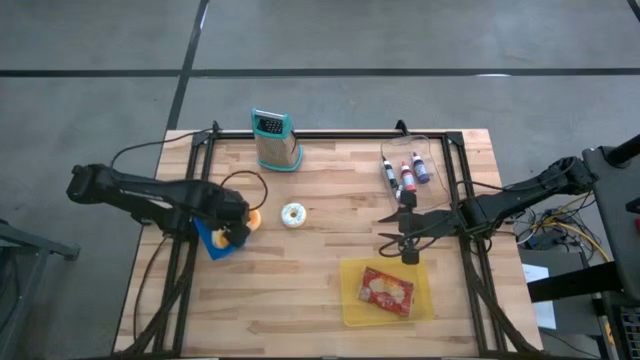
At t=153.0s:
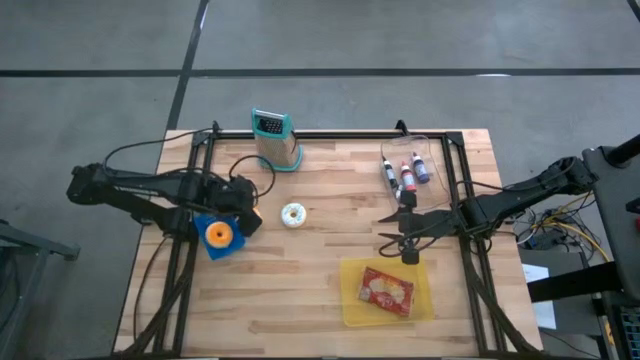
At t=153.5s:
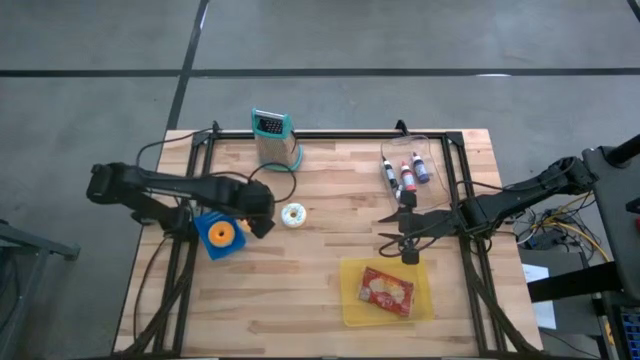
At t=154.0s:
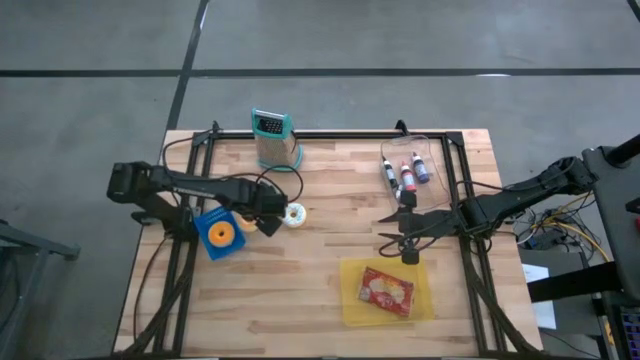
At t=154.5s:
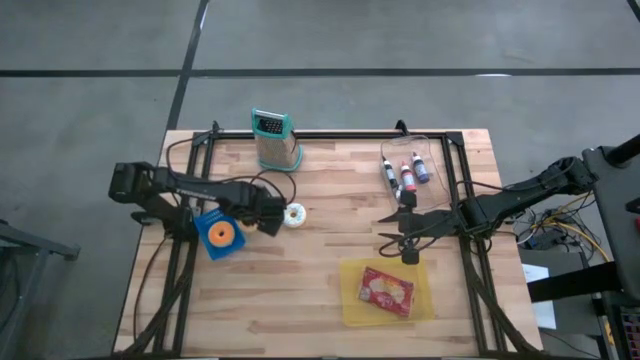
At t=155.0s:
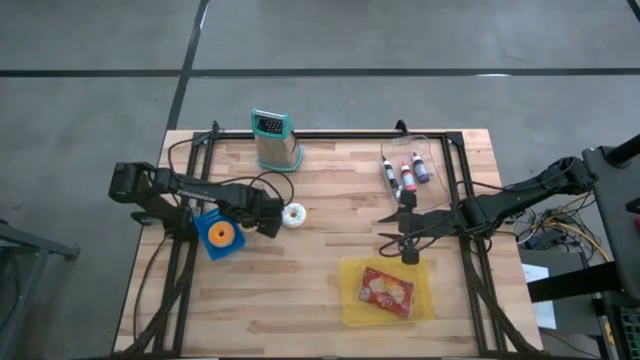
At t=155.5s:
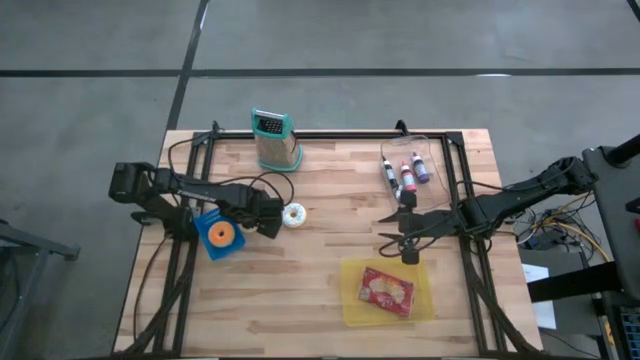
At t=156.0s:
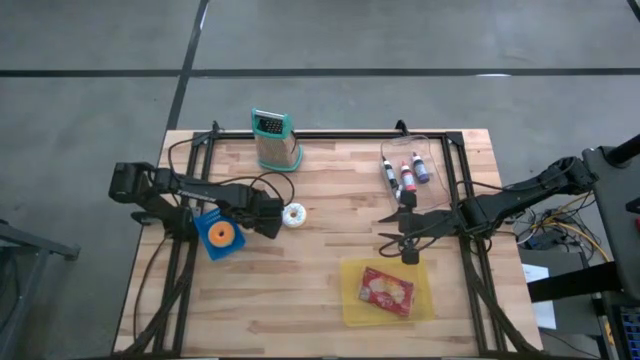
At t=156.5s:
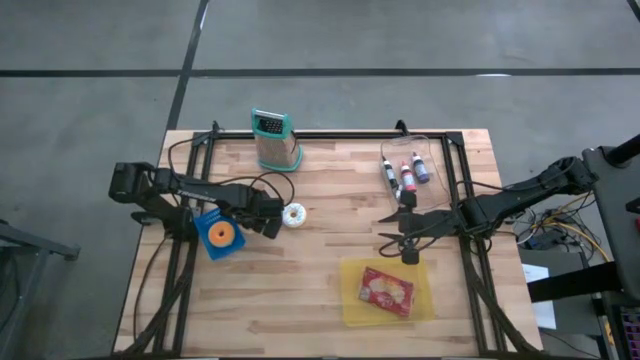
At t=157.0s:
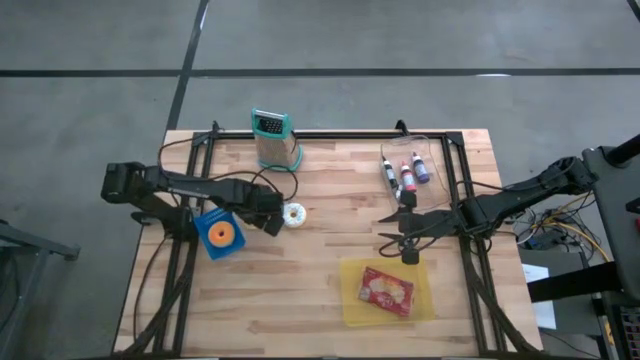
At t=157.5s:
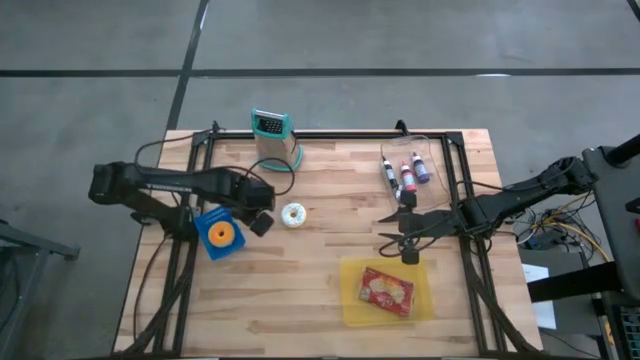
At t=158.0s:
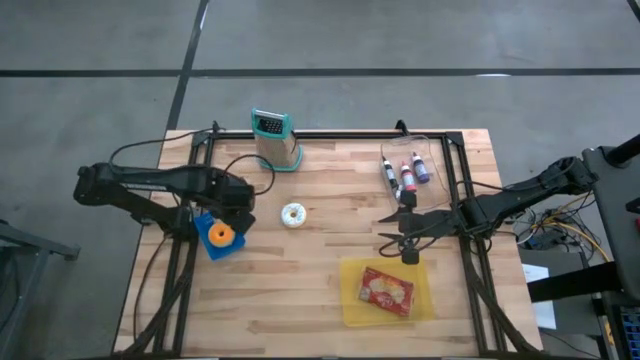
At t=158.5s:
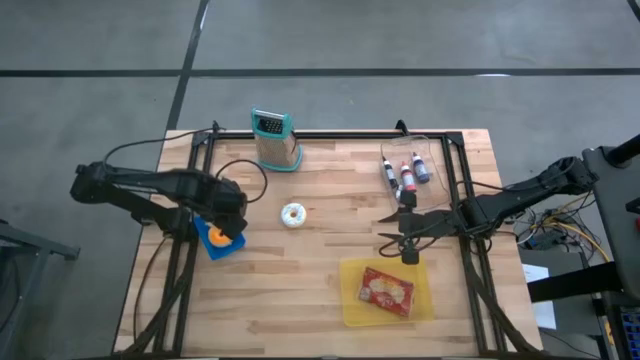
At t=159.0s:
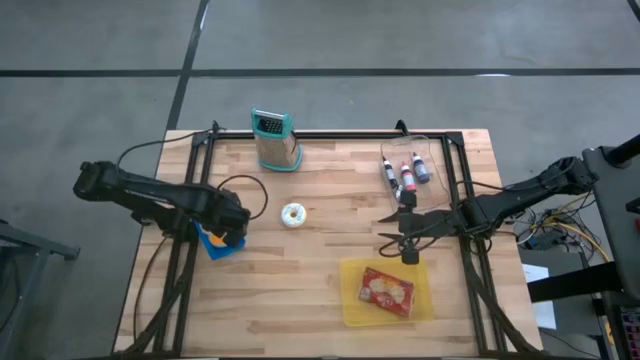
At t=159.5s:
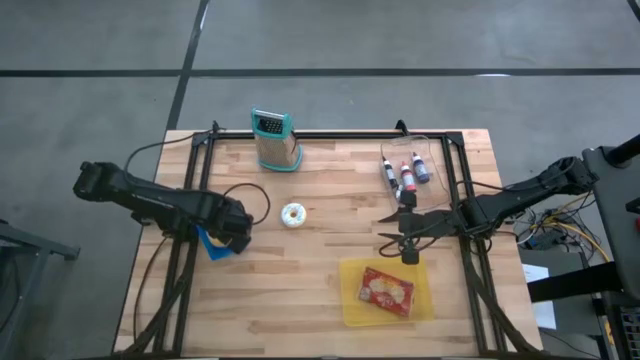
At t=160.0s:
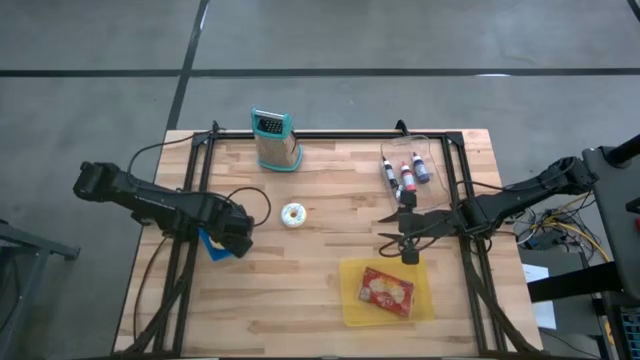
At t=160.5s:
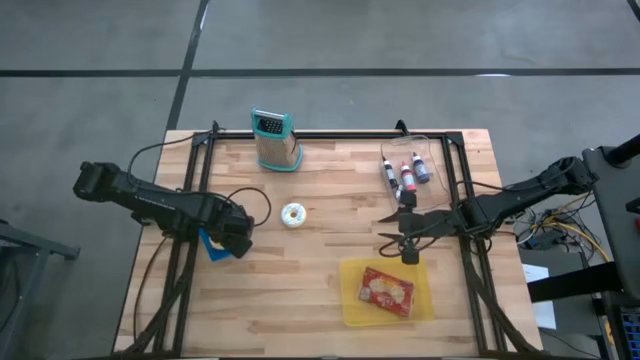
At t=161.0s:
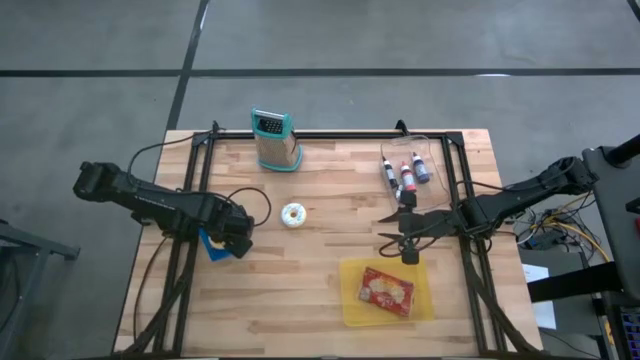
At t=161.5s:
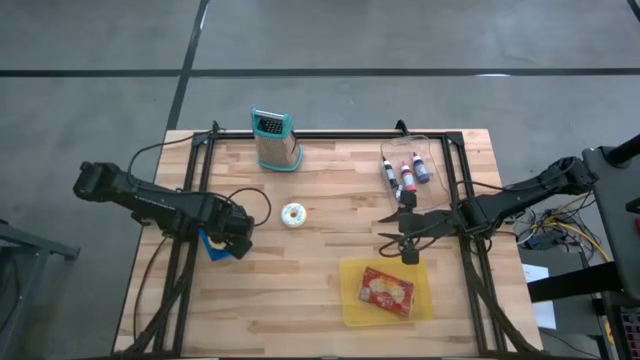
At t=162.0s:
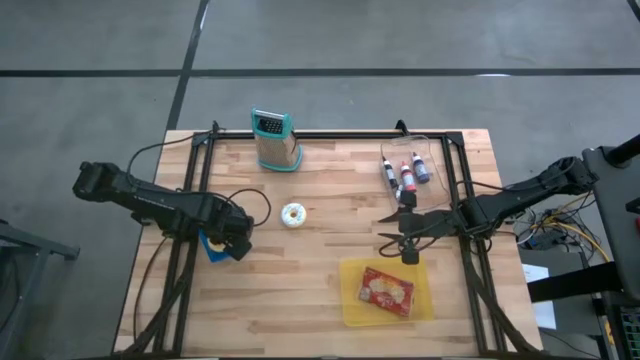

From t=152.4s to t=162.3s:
Task: Pick & Place Food Item
Put the orange donut into the blue bin

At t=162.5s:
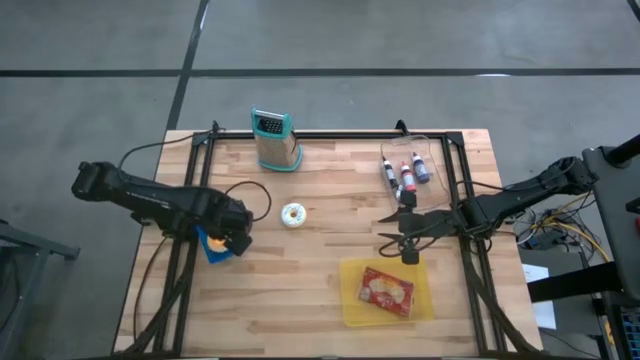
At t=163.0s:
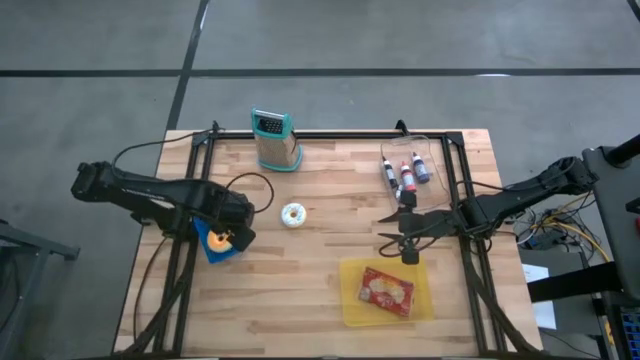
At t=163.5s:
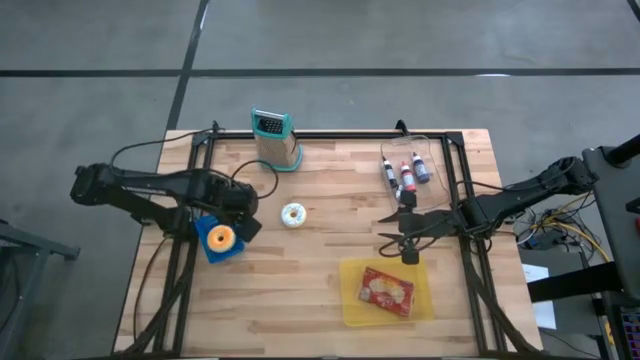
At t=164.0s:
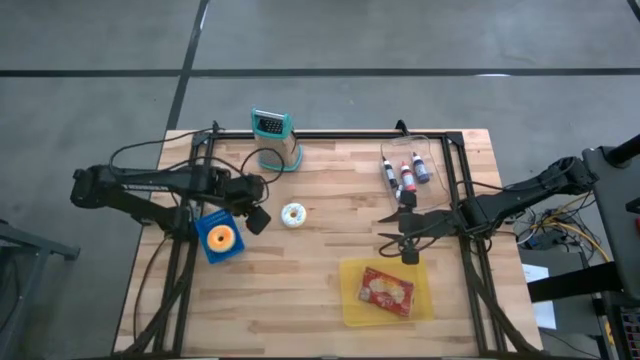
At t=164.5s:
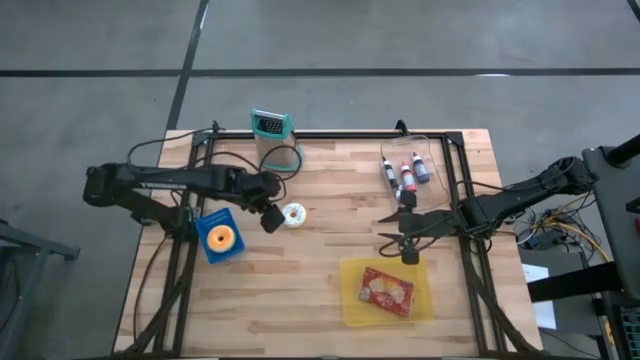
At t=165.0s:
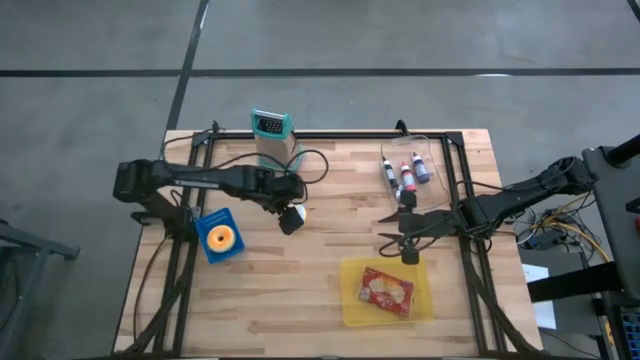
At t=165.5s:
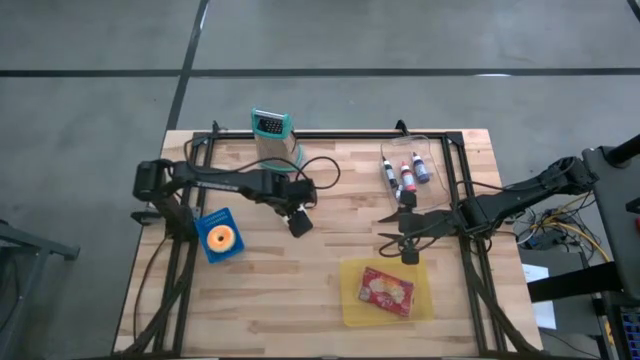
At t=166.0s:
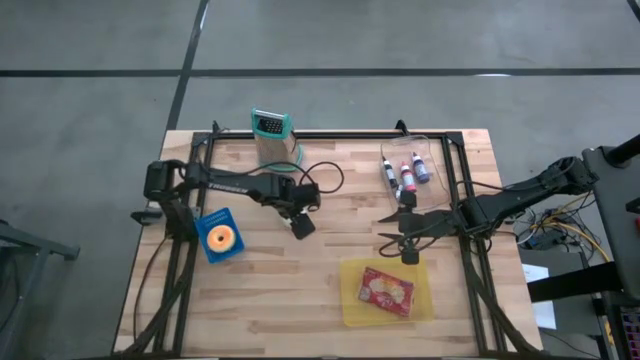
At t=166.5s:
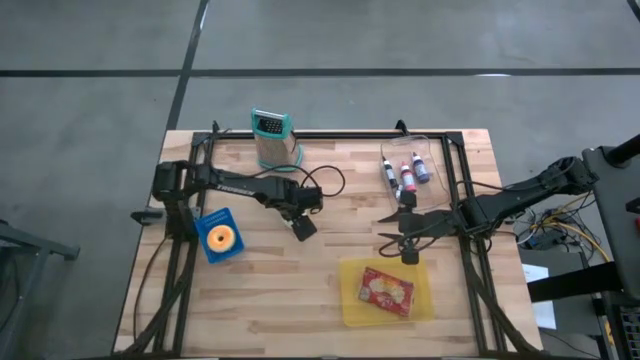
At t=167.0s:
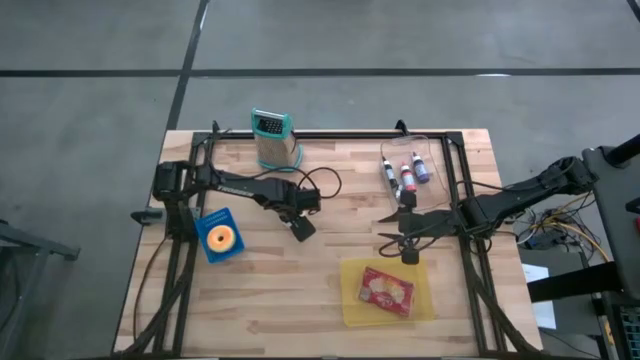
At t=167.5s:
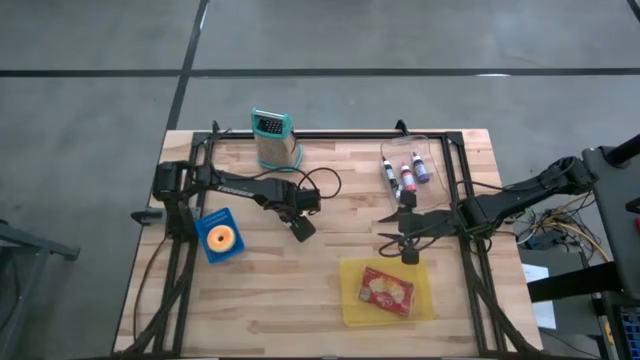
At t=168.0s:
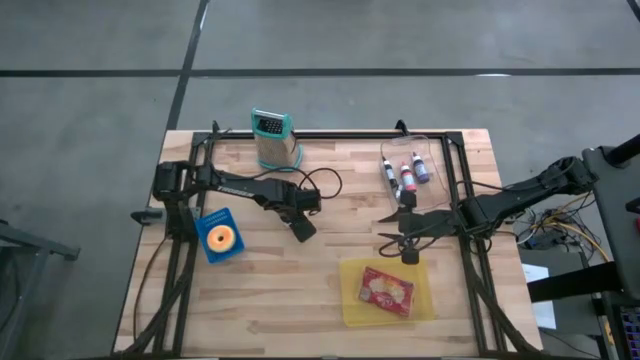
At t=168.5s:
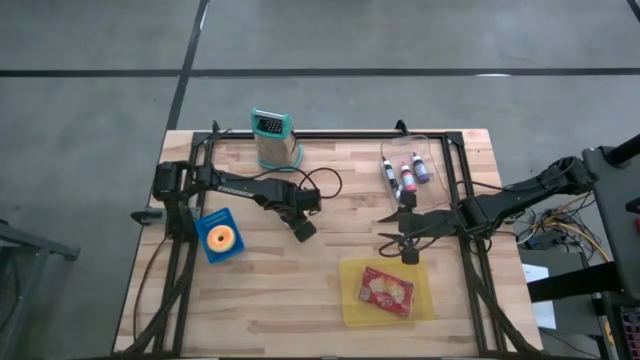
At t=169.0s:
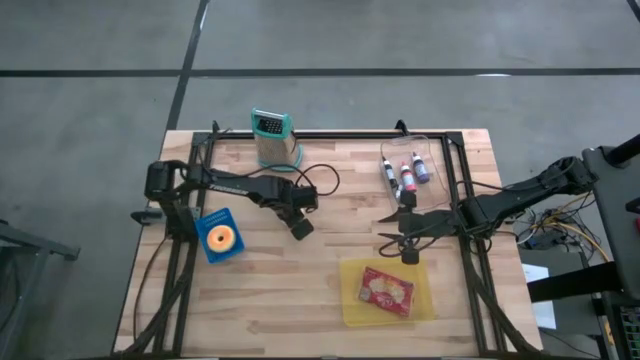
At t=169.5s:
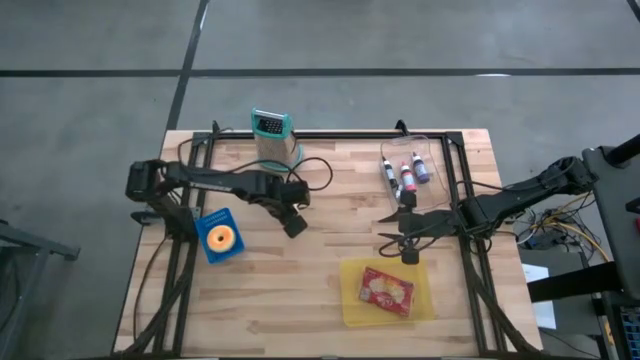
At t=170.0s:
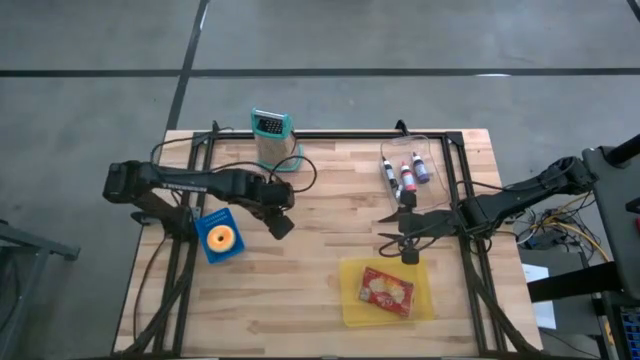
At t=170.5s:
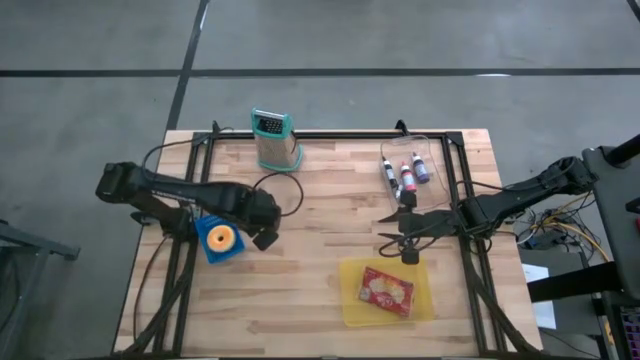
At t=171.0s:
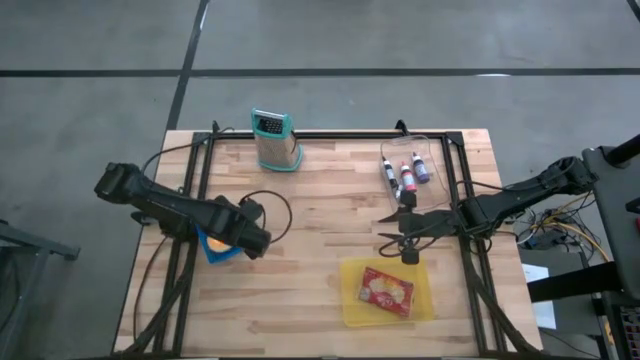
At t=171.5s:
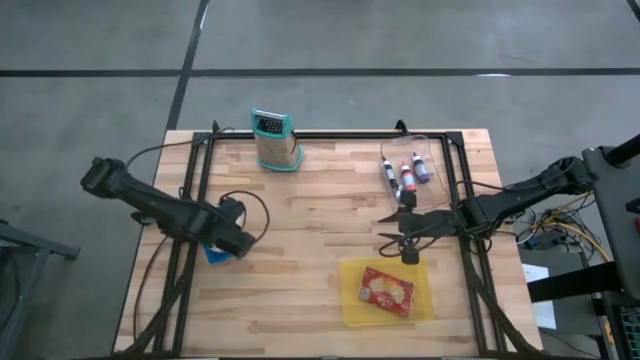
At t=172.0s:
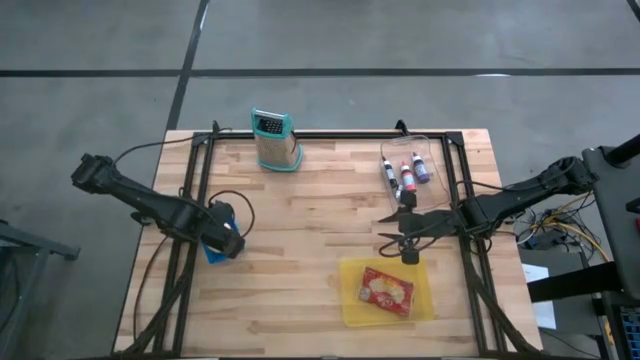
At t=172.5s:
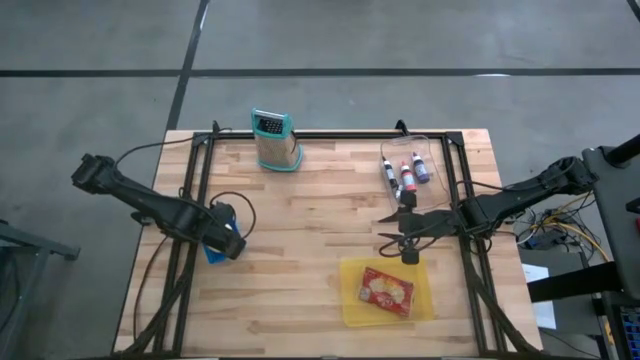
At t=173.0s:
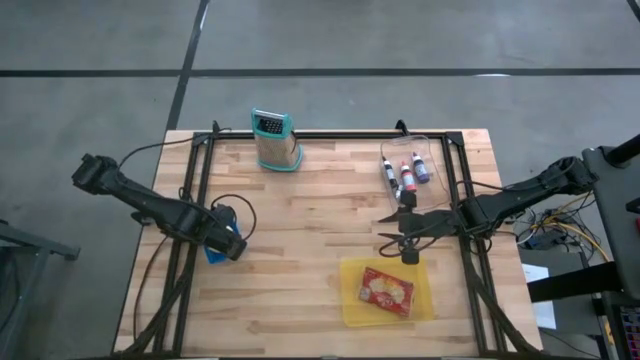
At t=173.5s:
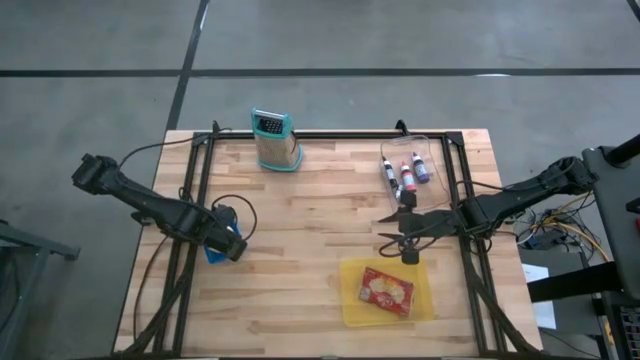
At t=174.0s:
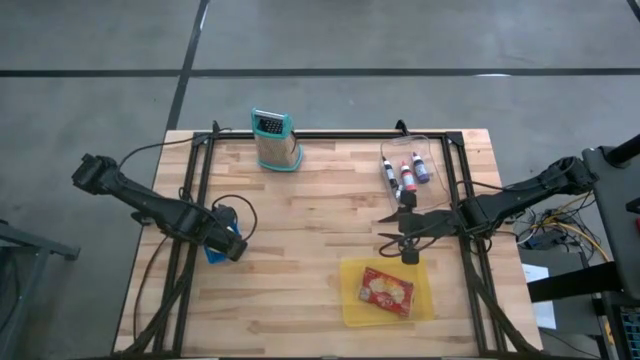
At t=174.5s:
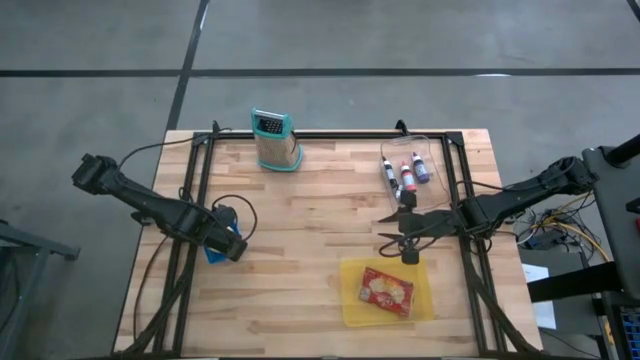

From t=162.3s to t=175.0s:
Put the white donut into the blue bin
